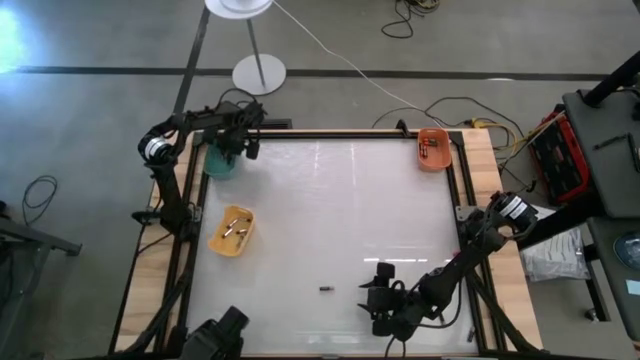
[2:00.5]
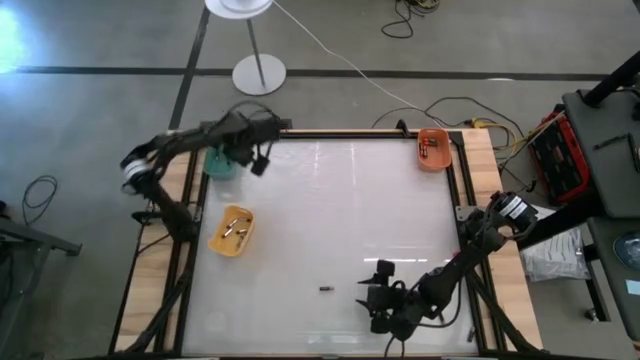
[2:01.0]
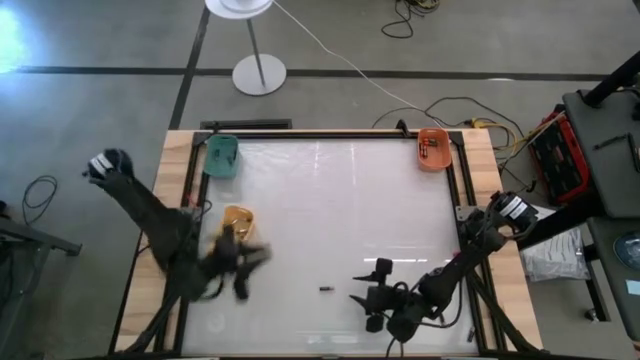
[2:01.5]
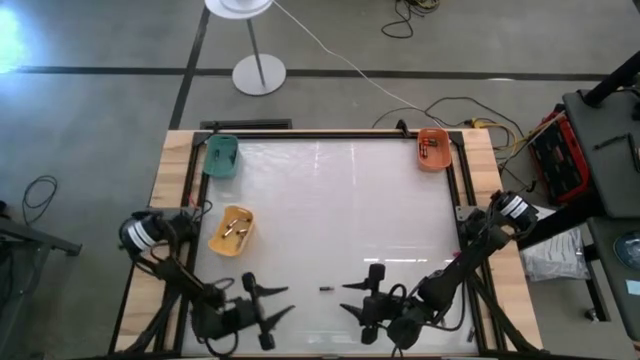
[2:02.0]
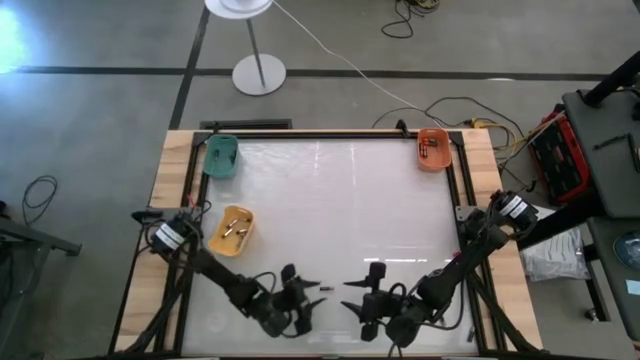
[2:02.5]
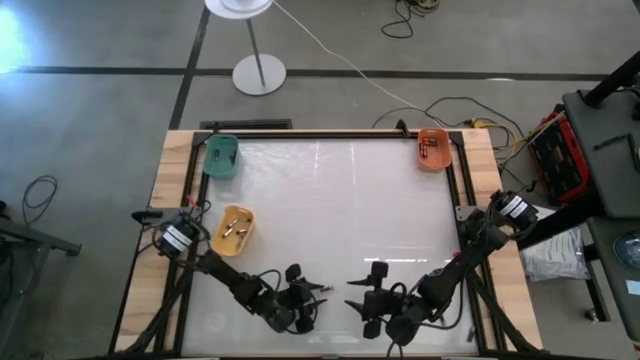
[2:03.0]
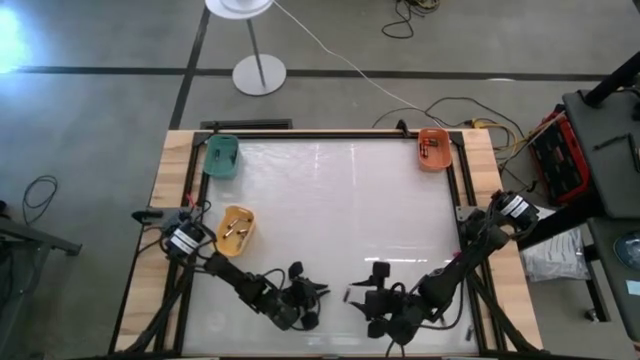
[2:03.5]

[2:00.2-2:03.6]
Task: Sort batteries
Put the black battery into the green bin

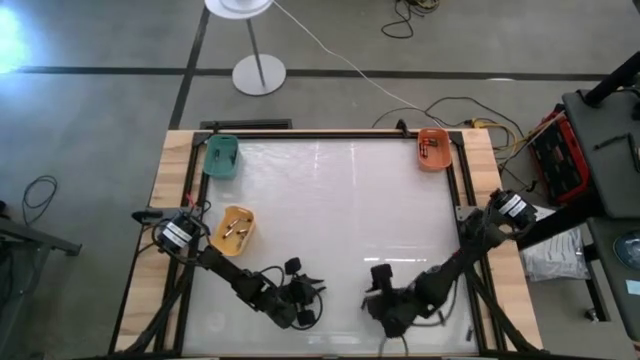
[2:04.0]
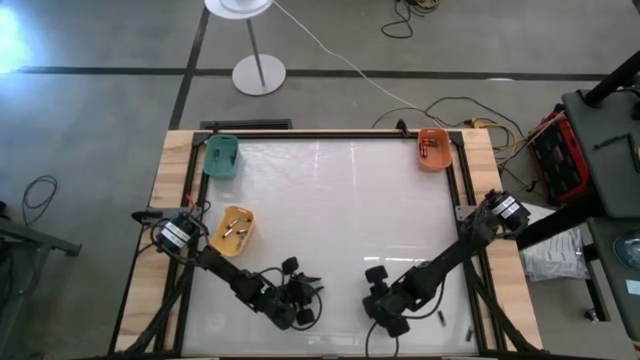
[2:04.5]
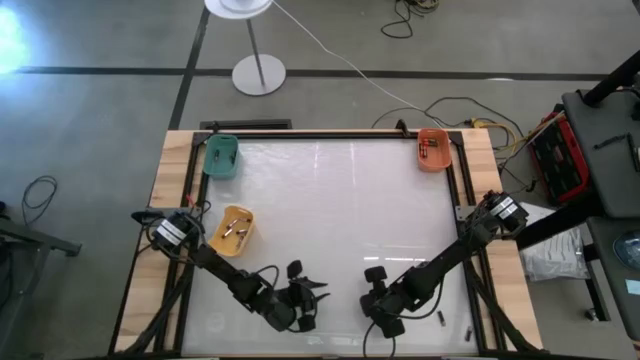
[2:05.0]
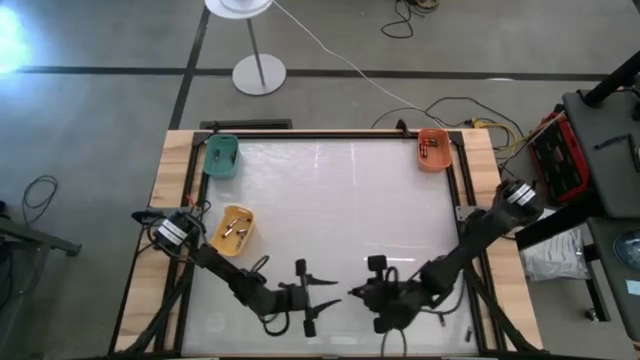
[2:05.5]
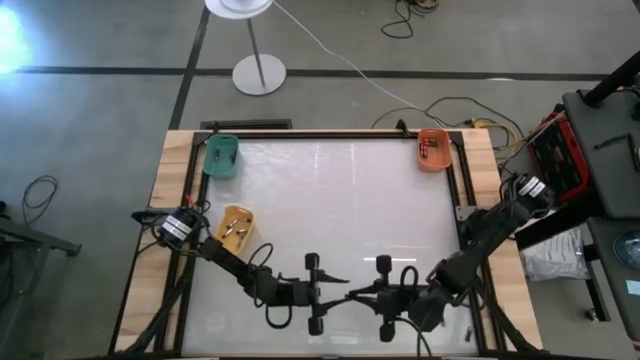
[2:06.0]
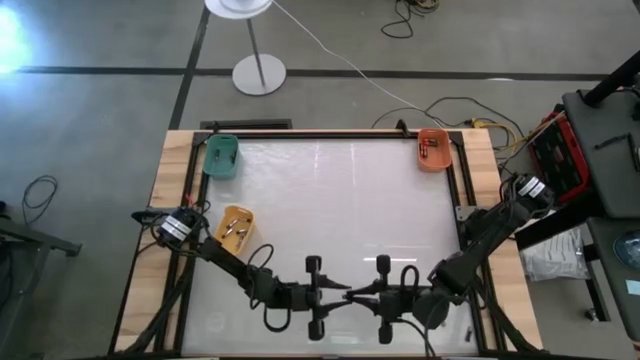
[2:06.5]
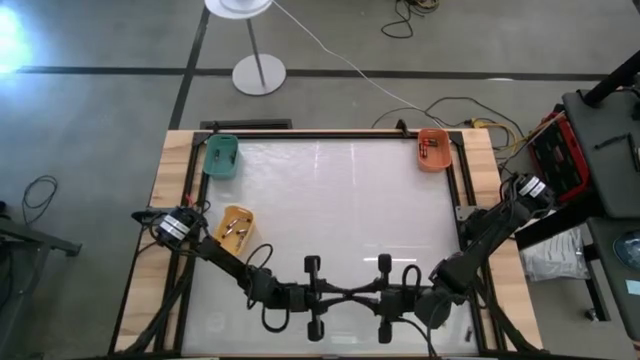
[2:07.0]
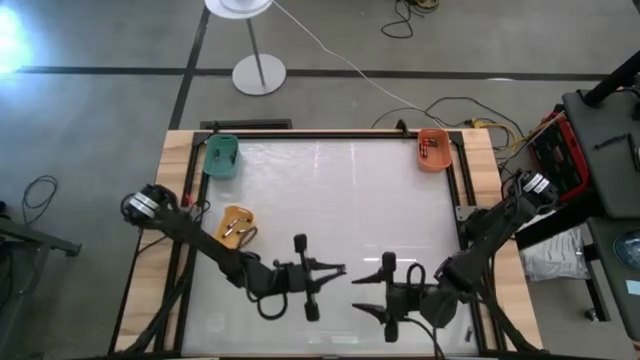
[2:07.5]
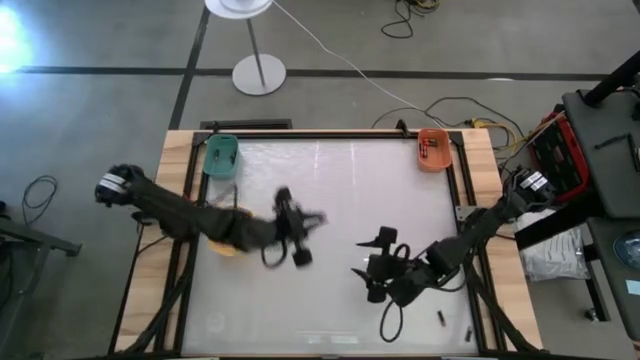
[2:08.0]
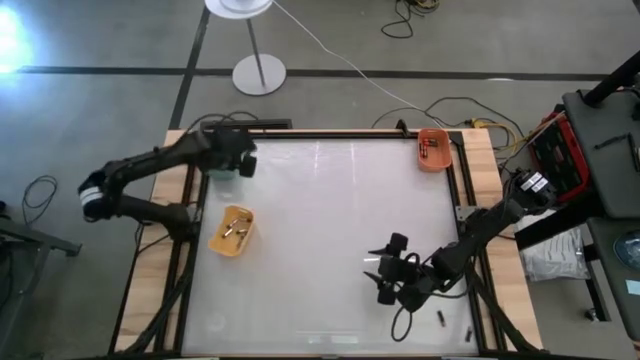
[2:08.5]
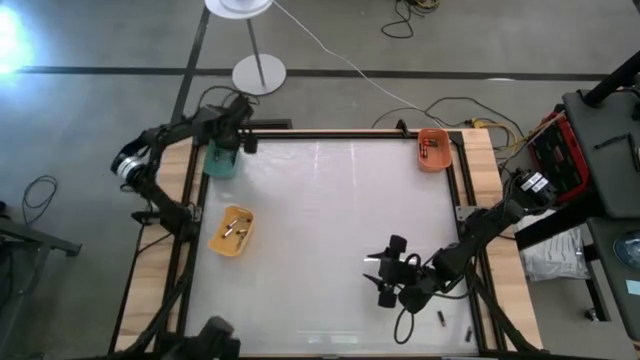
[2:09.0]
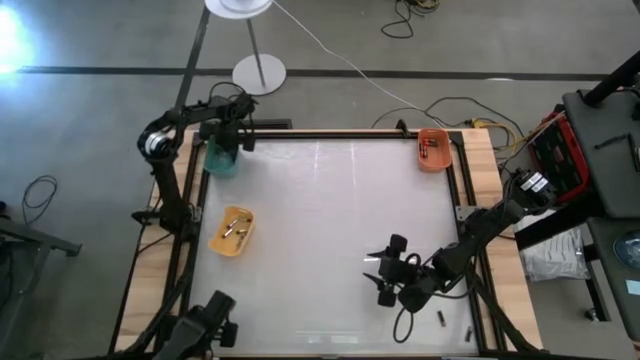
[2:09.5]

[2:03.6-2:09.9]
Put the black battery into the green bin

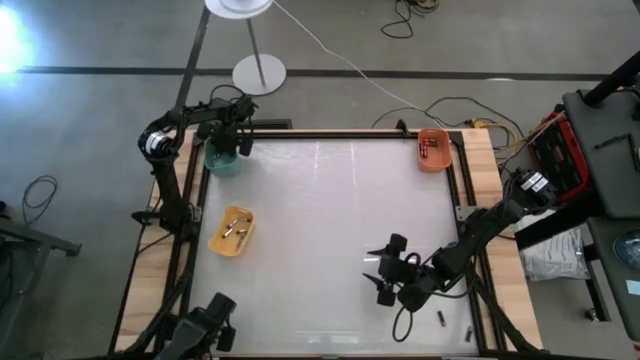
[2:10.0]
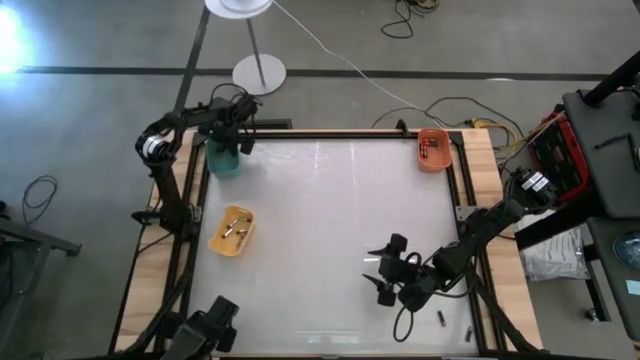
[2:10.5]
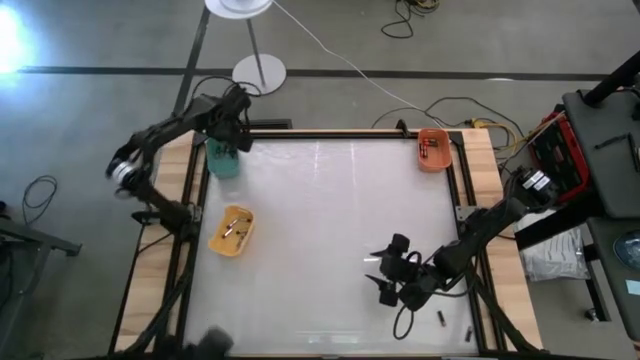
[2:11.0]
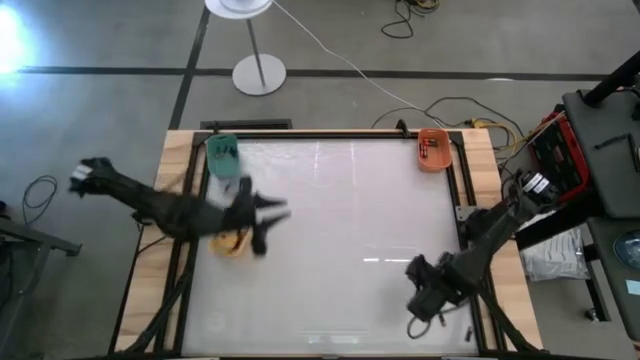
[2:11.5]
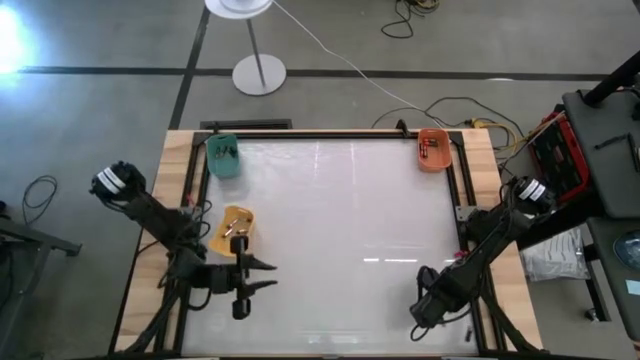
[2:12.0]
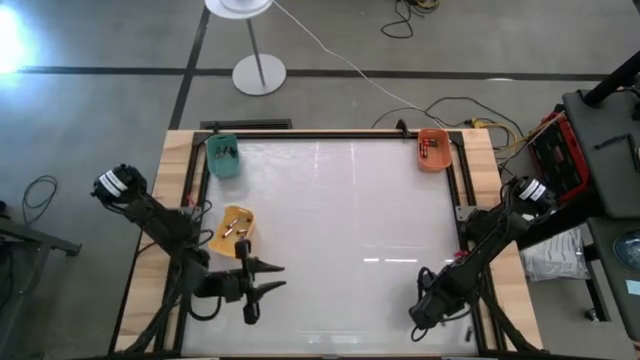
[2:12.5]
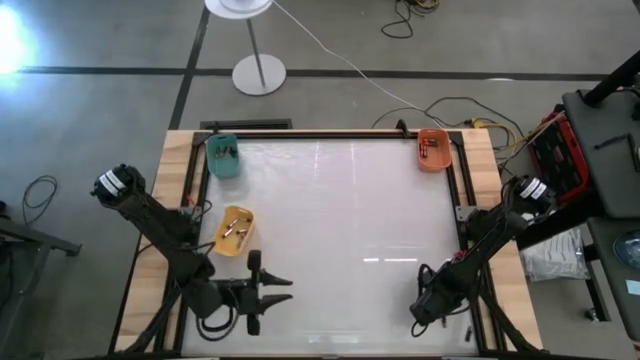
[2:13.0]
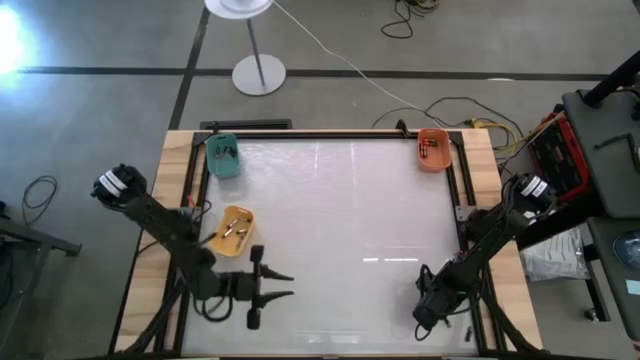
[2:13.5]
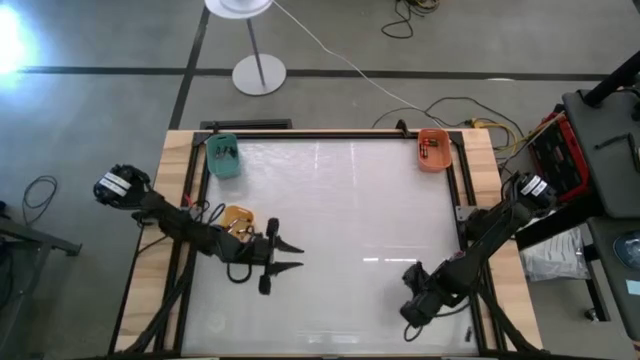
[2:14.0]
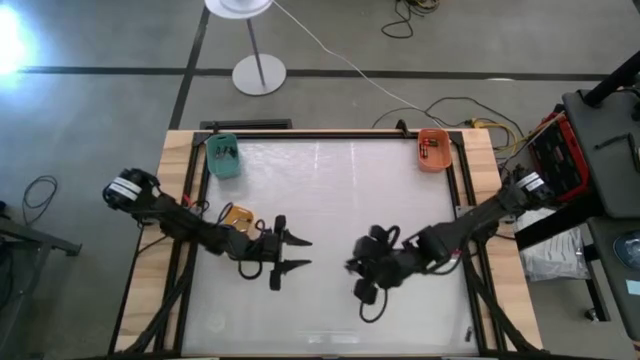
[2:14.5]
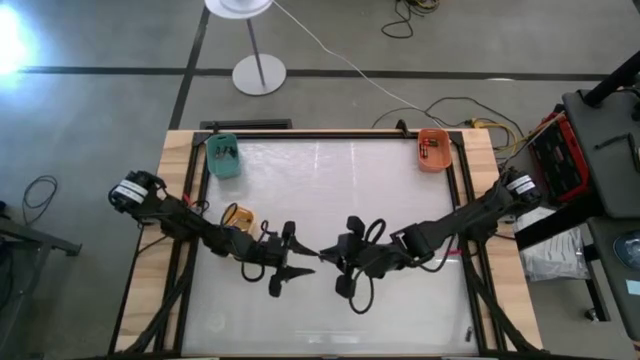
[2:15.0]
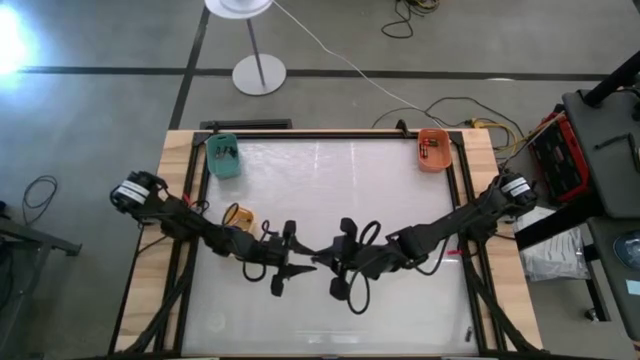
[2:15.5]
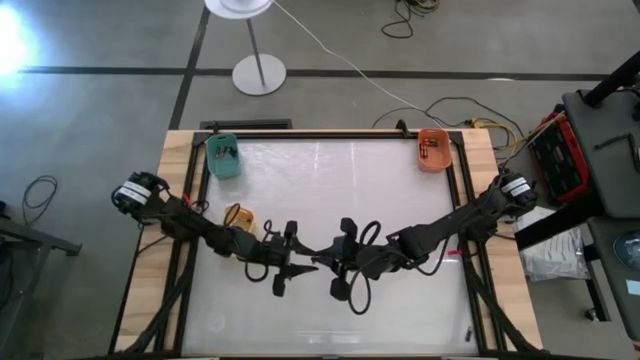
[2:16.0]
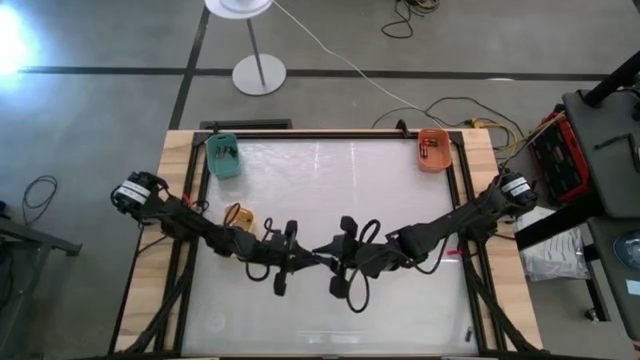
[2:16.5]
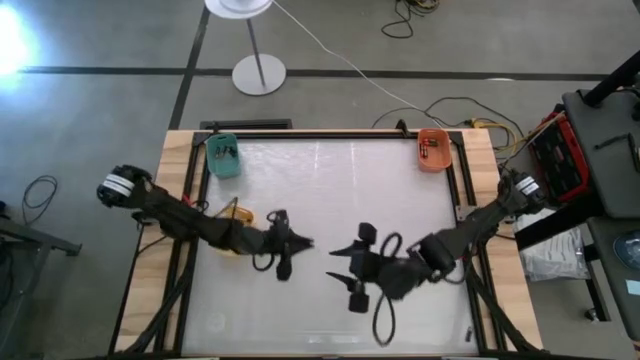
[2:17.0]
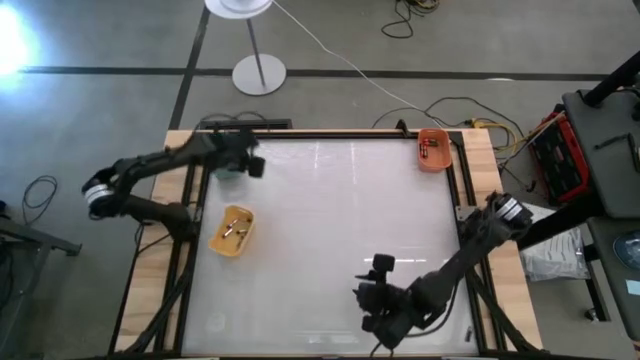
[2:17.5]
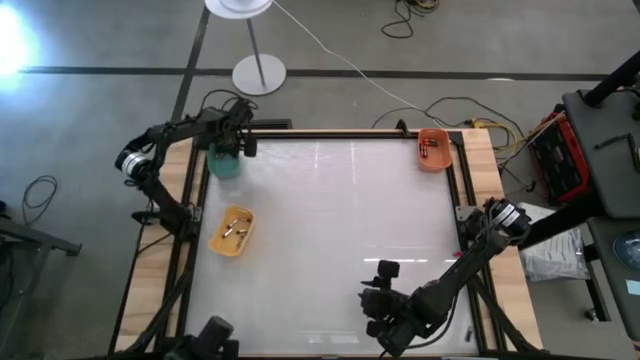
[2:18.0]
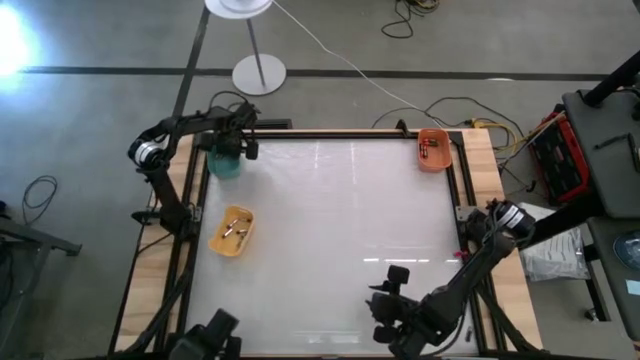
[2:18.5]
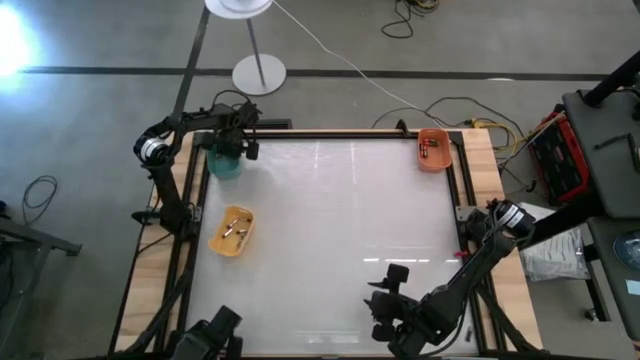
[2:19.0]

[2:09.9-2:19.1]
Put the black battery into the green bin

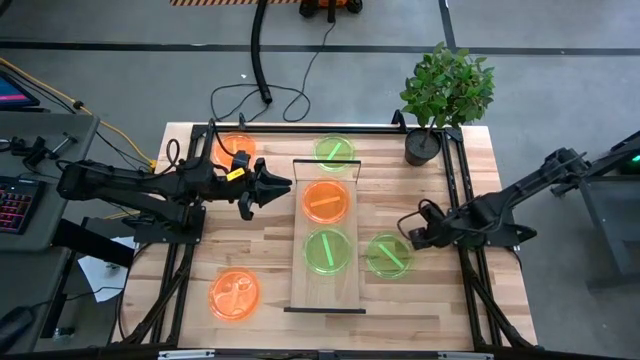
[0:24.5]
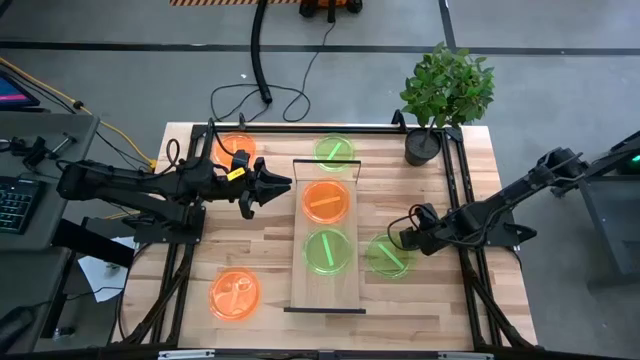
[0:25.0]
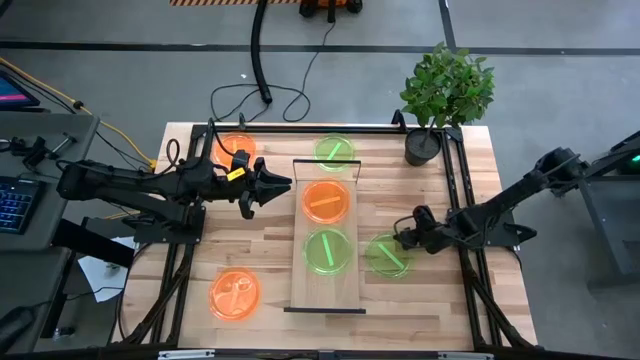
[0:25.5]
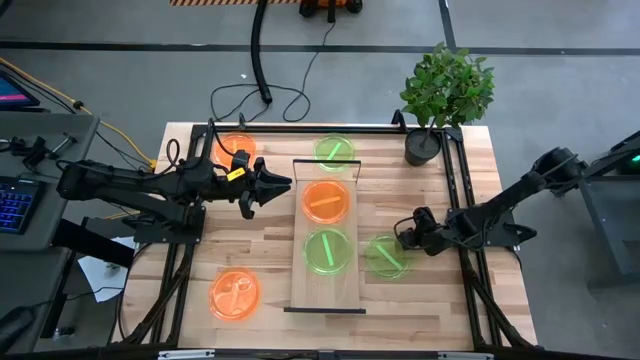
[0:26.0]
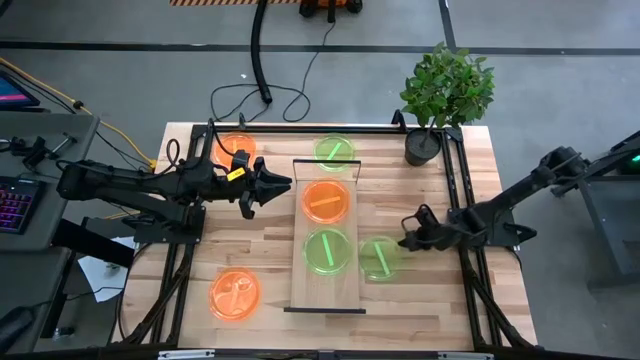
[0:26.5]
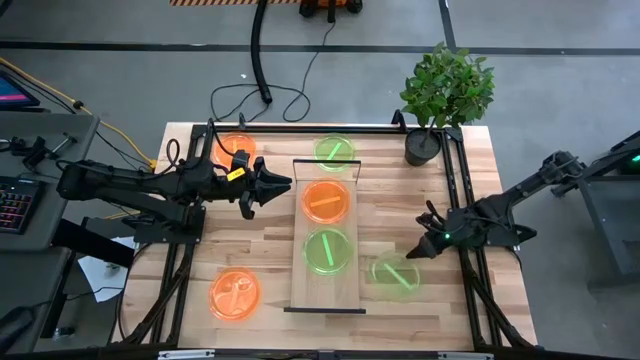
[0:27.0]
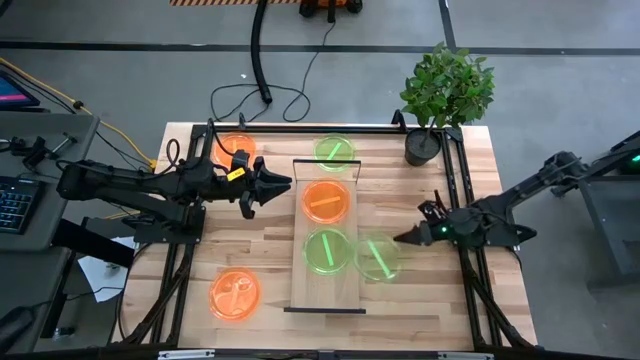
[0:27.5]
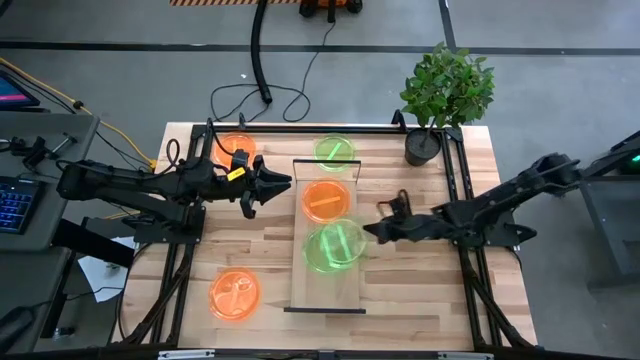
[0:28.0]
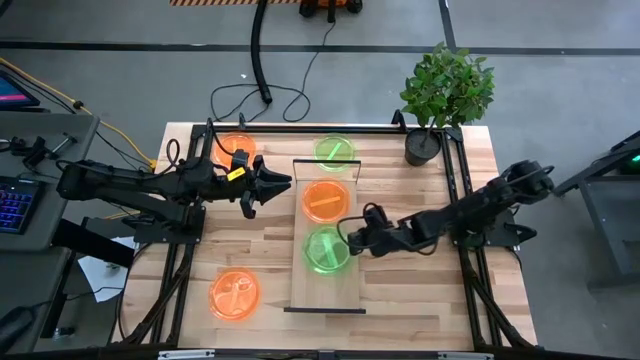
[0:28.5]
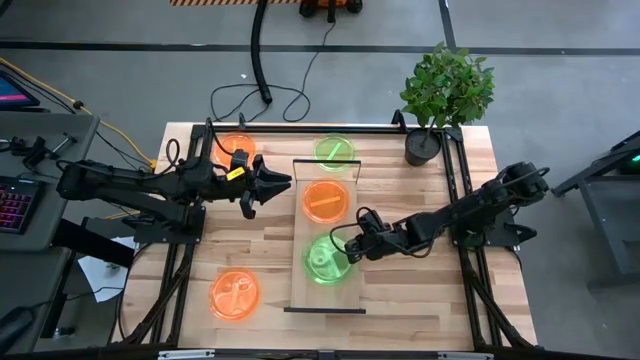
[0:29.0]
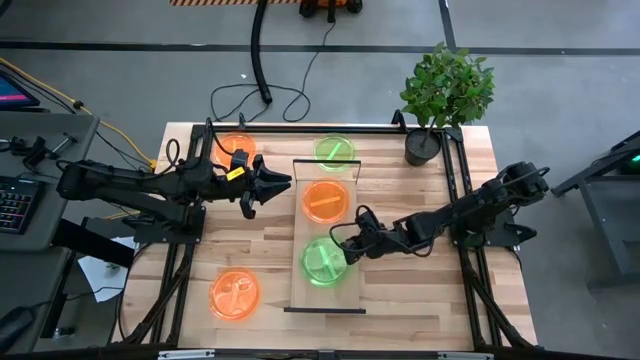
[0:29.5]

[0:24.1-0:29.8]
Task: Place and stack plates onto a shelf
Stack the bottom green plate on top of the green plate on the shelf
